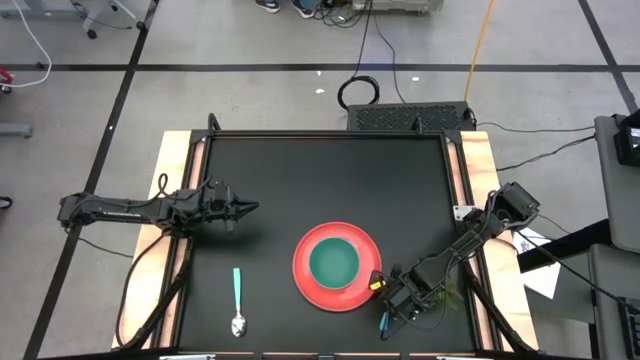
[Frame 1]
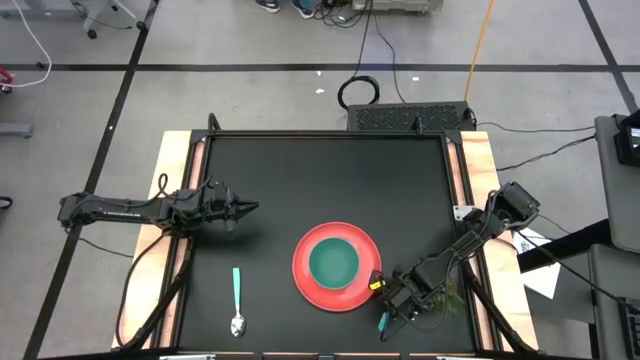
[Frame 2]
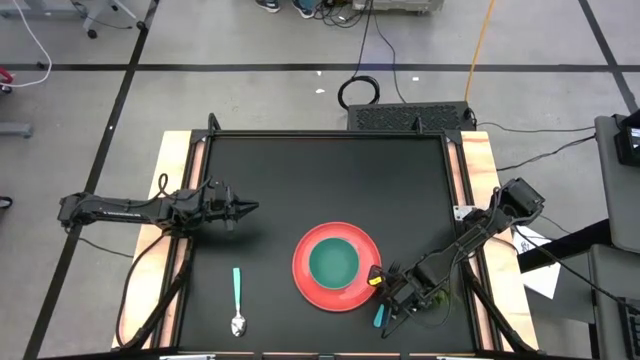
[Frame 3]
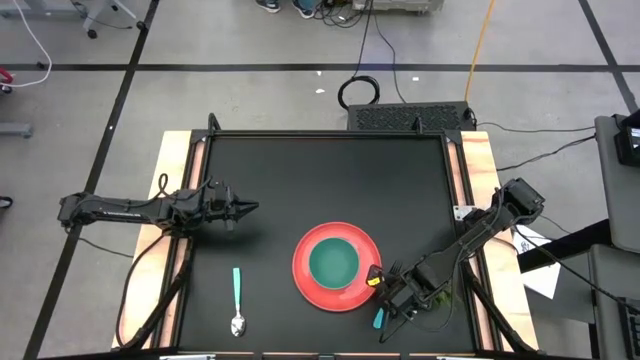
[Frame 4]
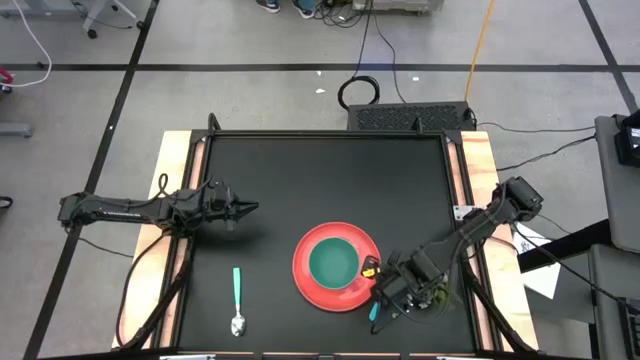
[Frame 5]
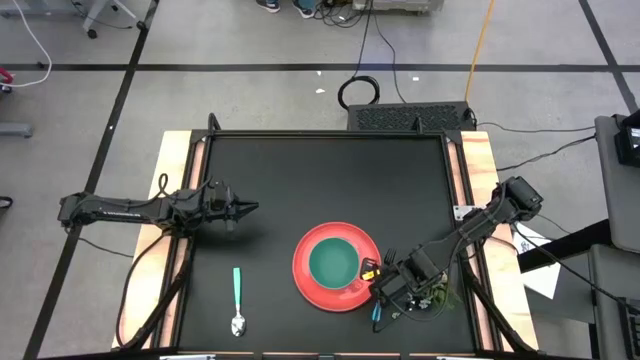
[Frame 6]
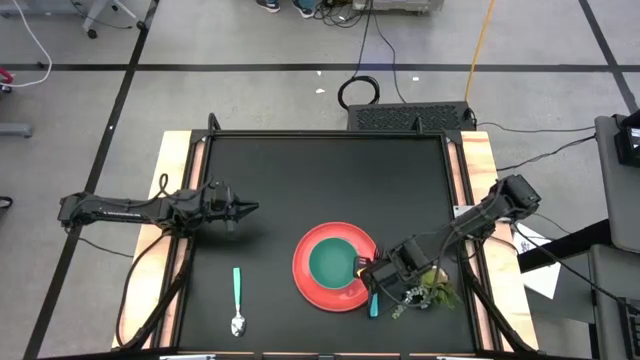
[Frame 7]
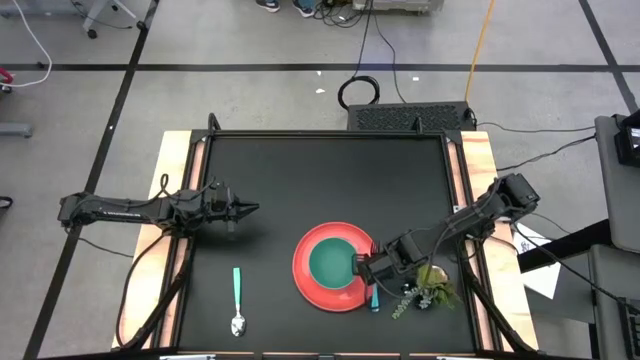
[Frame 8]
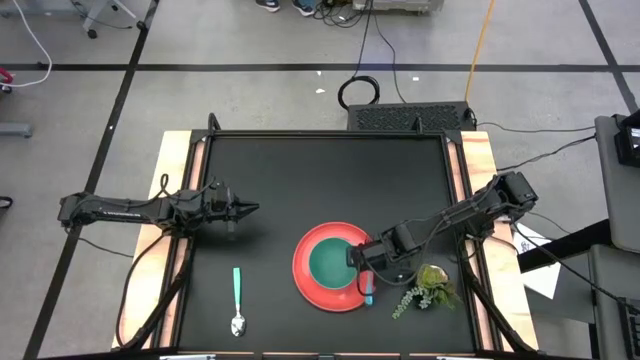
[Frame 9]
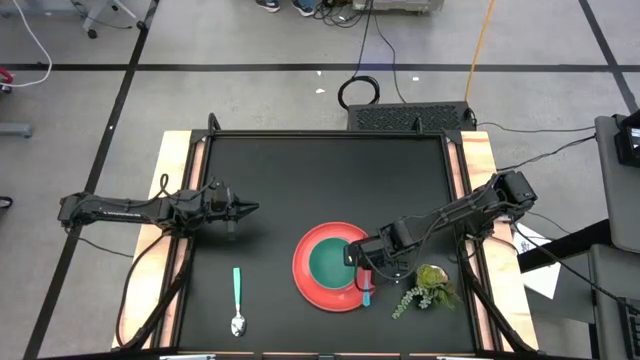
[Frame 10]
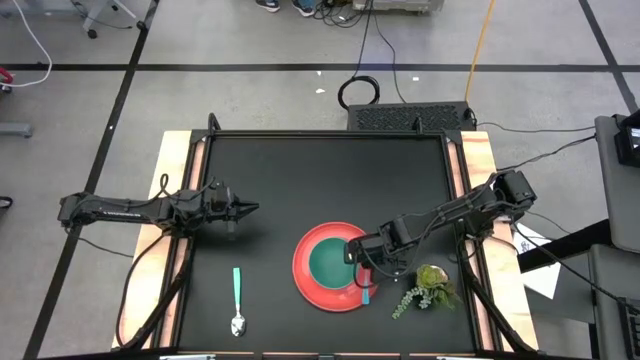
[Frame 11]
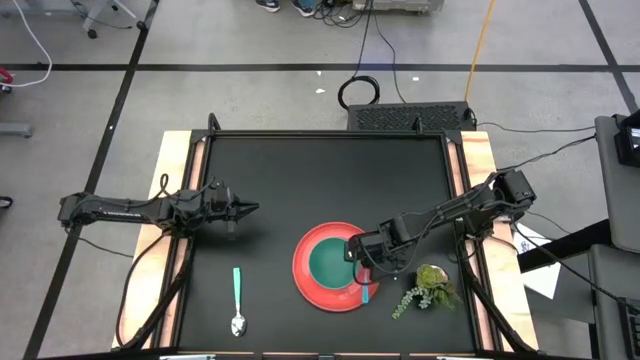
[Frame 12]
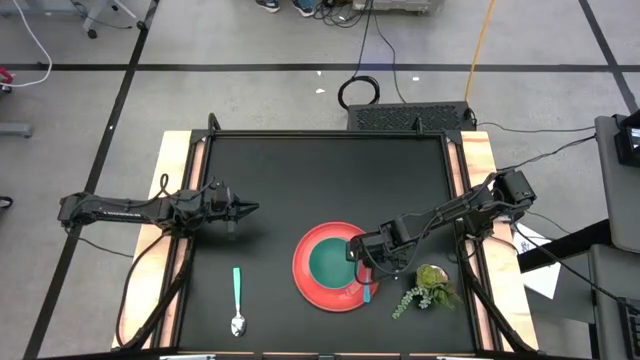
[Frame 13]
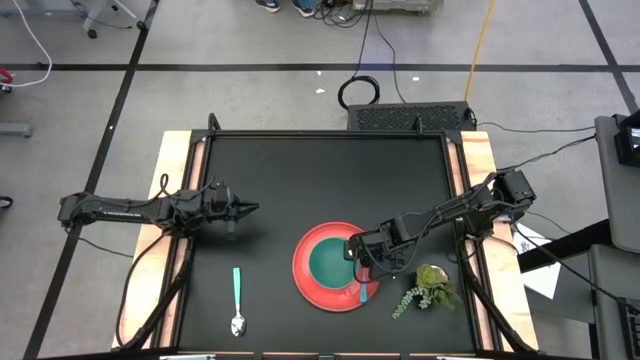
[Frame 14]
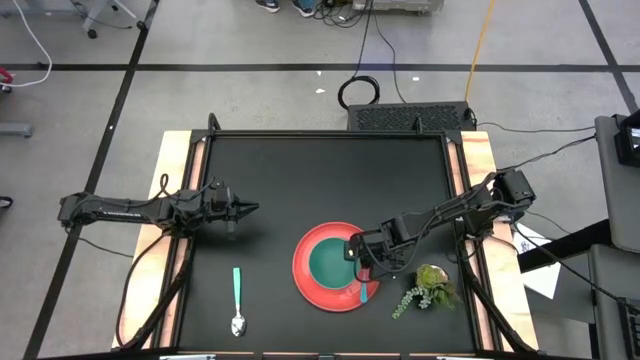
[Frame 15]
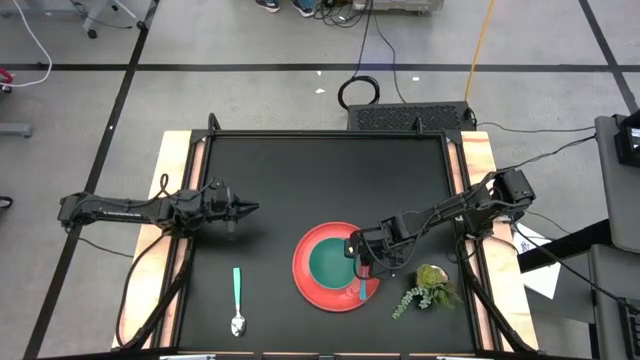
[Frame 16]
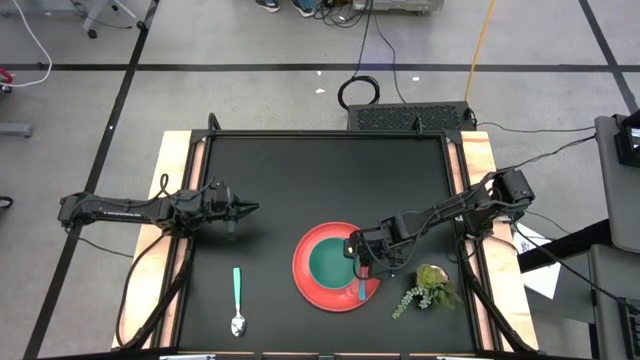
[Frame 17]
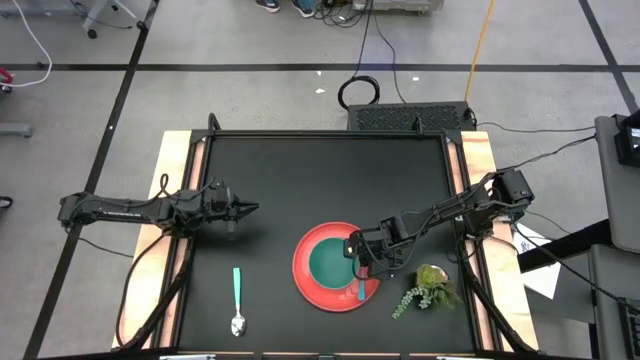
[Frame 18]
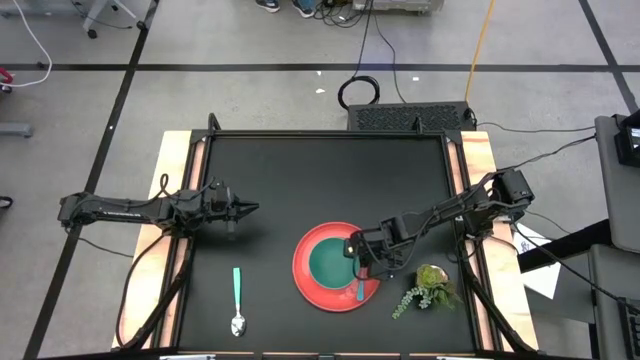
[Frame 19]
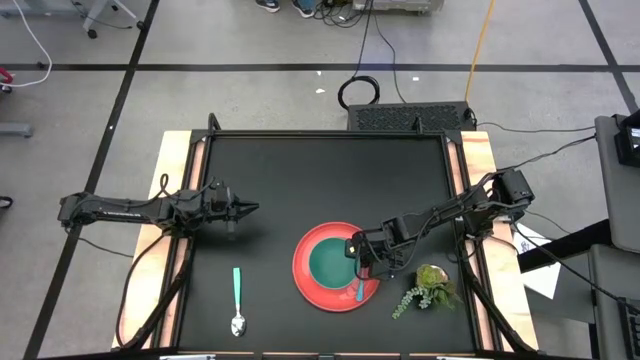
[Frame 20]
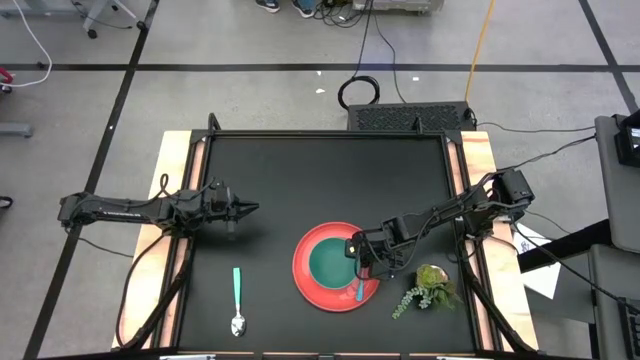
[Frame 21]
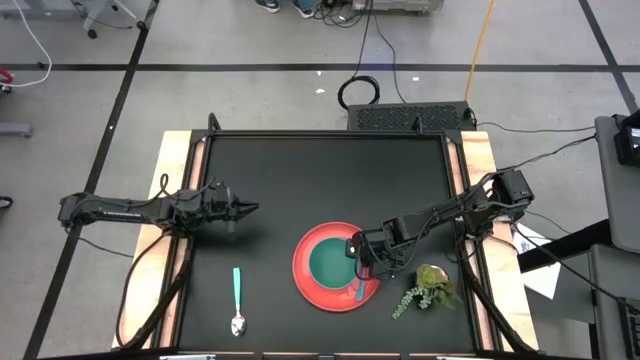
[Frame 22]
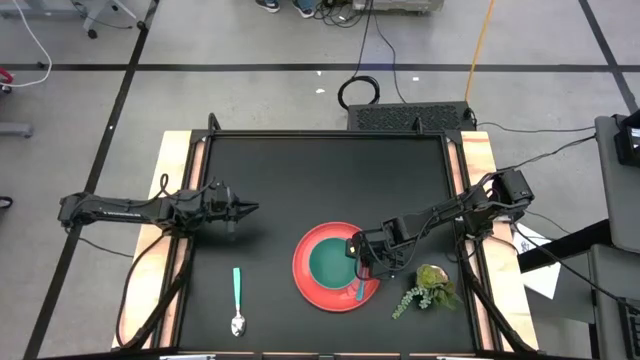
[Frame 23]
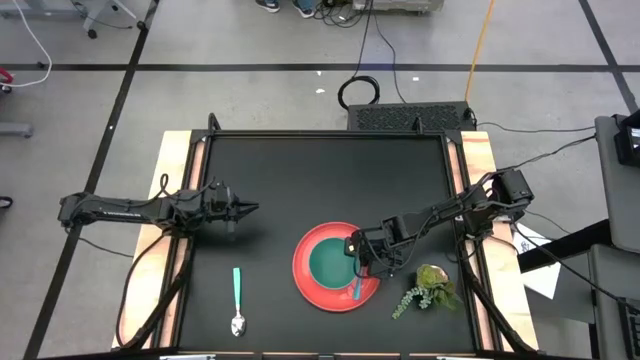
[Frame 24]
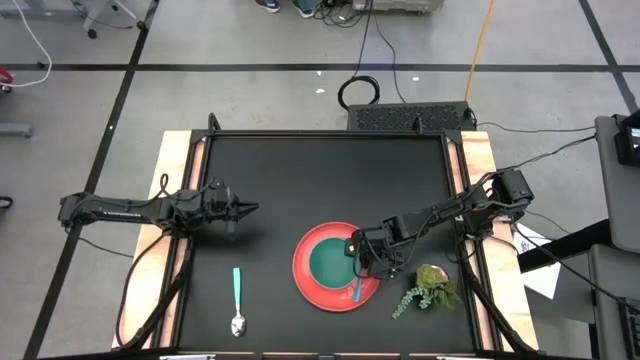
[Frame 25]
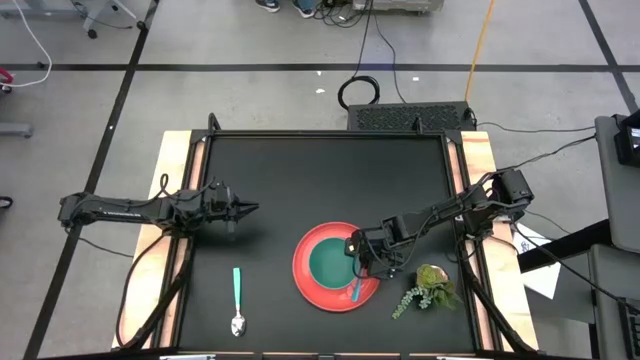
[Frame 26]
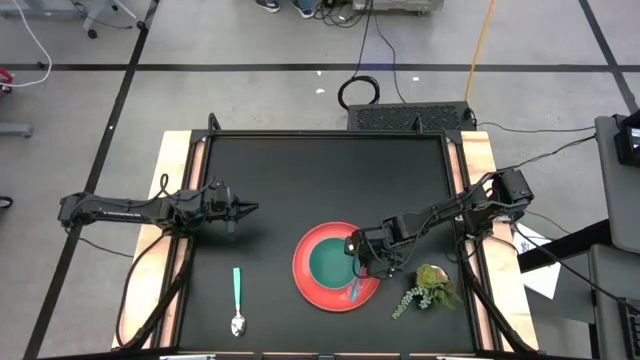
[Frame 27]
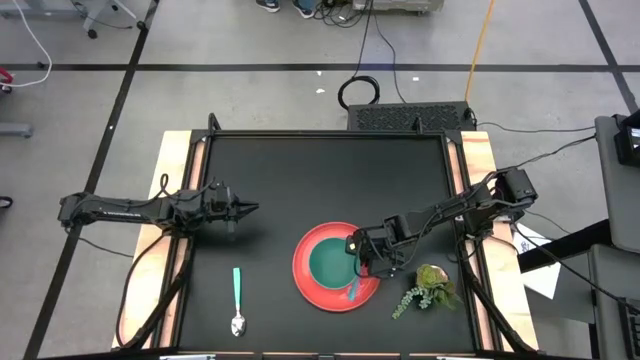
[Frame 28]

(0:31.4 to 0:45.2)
Task: Set table place
Put the blue fork on the orange plate to the right of the green bowl

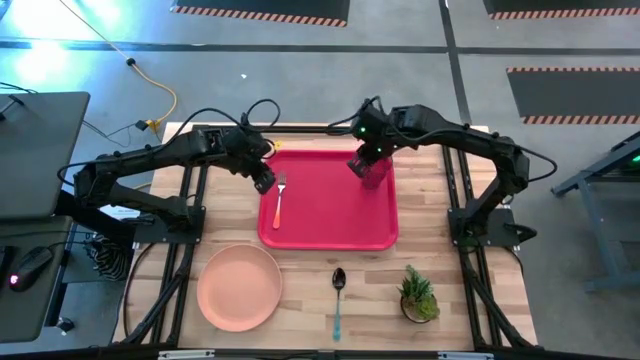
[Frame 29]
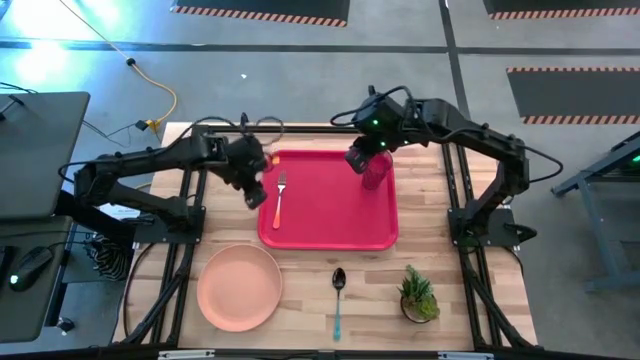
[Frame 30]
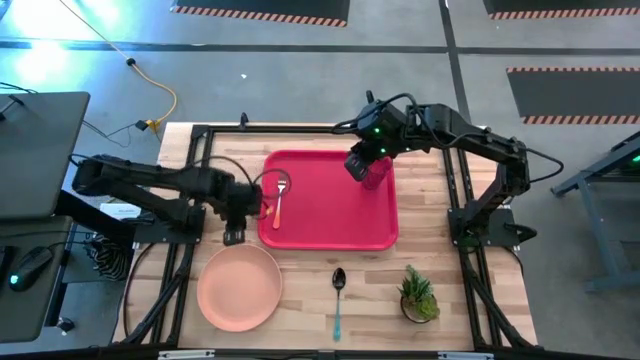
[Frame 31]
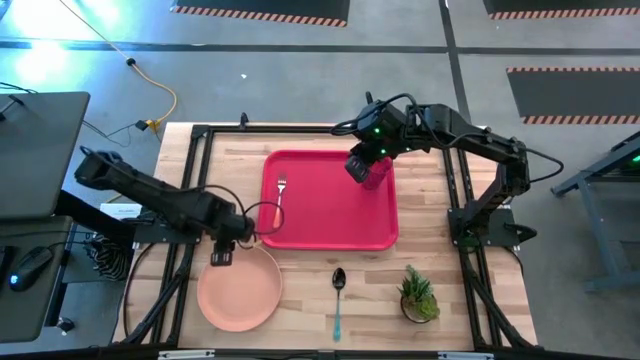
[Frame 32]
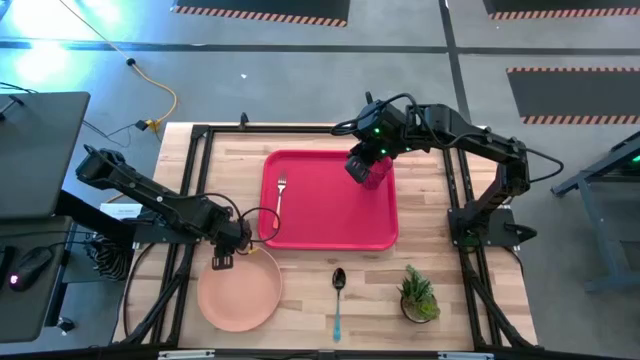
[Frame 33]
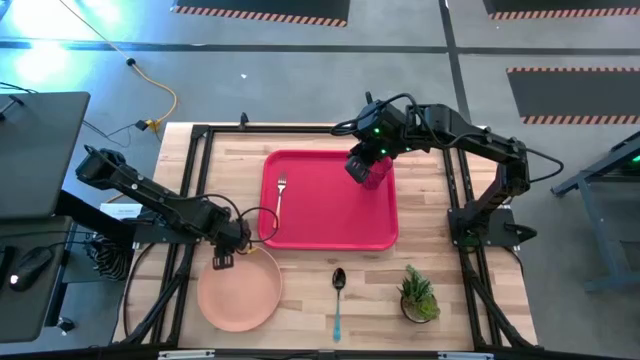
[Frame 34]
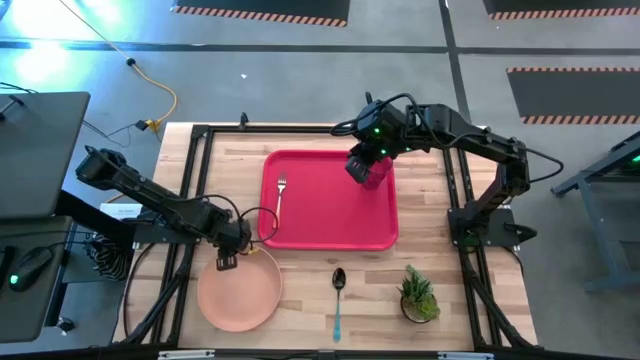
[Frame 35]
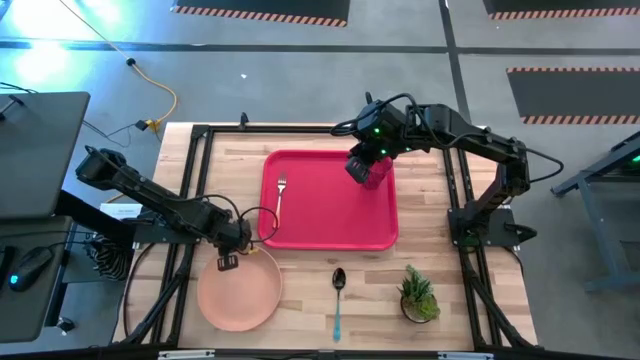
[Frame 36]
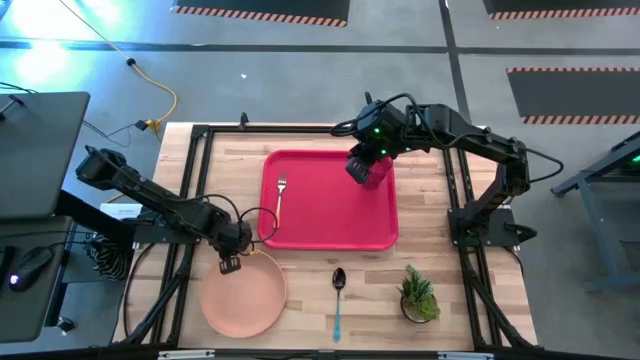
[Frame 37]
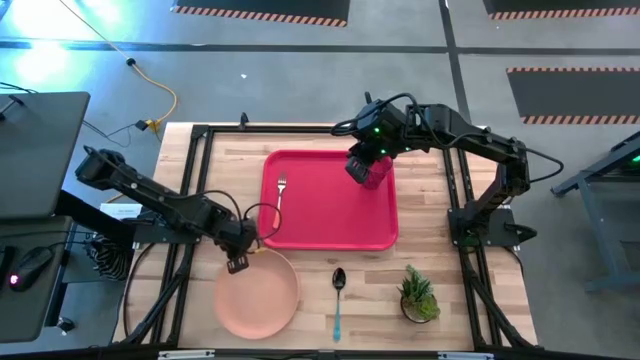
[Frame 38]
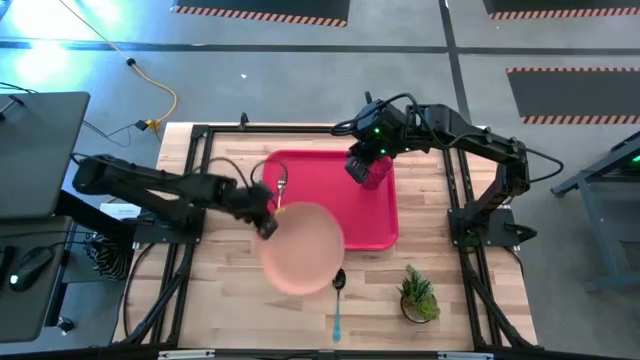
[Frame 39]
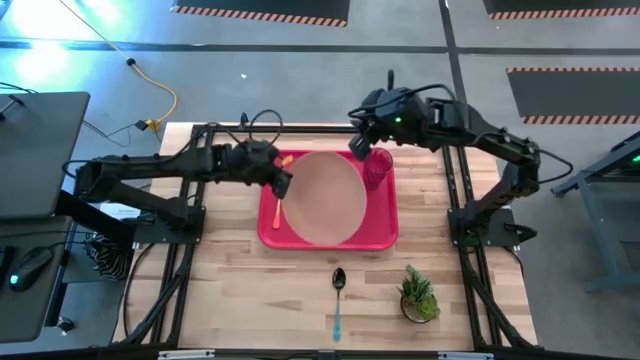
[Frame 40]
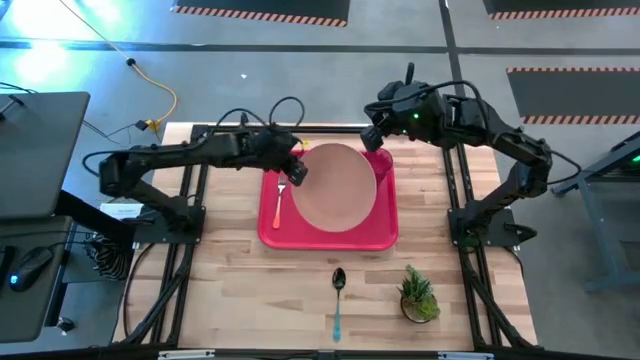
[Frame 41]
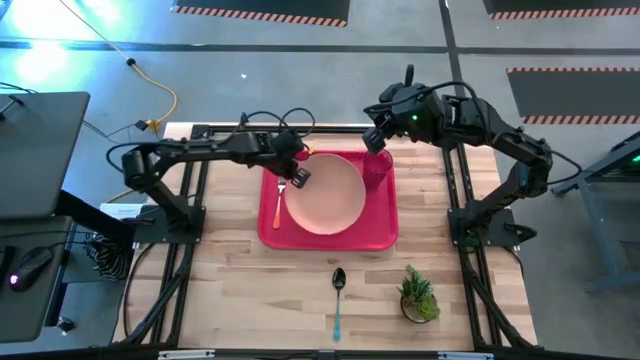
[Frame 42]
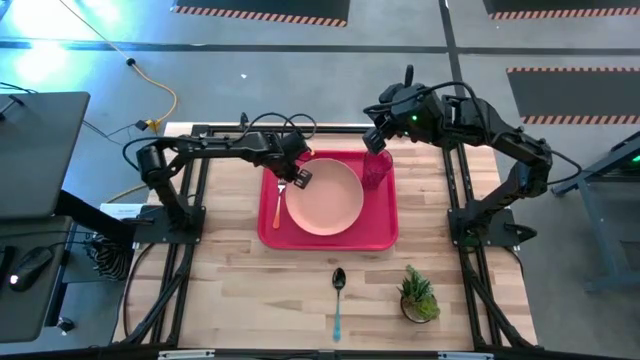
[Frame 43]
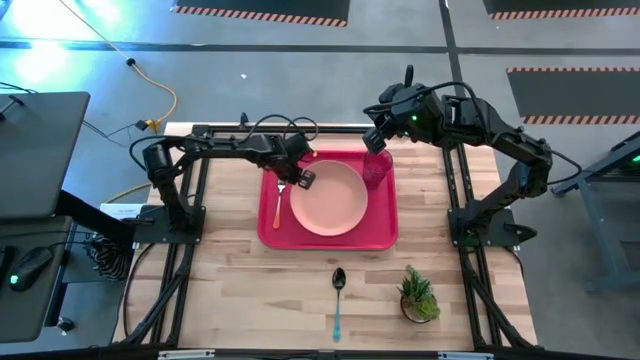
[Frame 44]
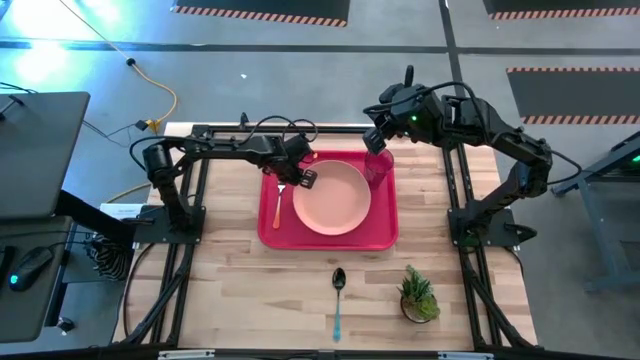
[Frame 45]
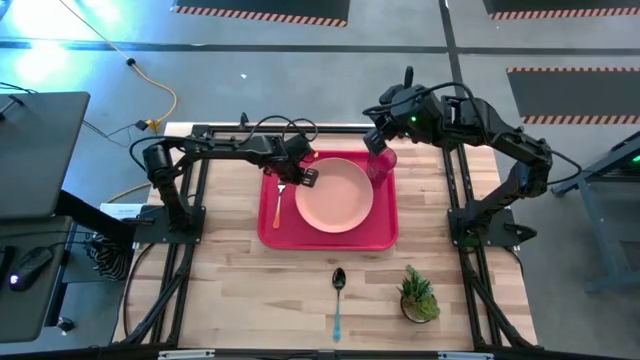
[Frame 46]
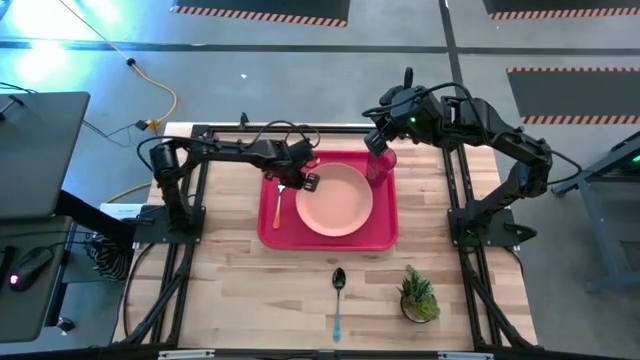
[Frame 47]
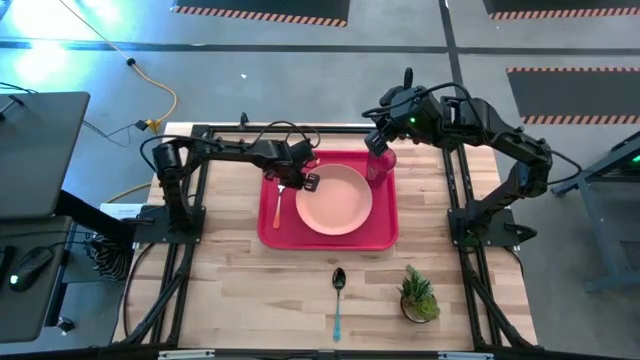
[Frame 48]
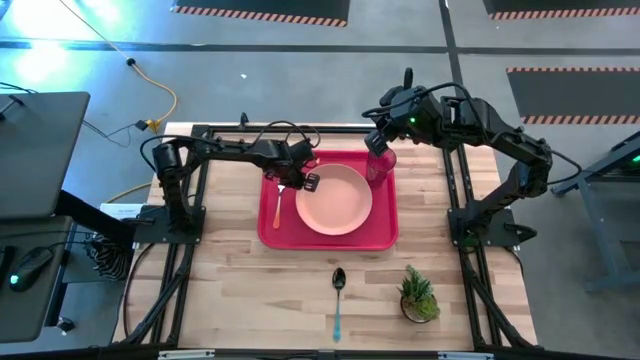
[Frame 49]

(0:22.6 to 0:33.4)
Task: Pick and place plate/cup/fork/spoon on tray
Put the plate on the tray to the right of the fork
